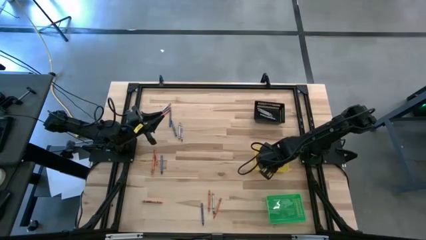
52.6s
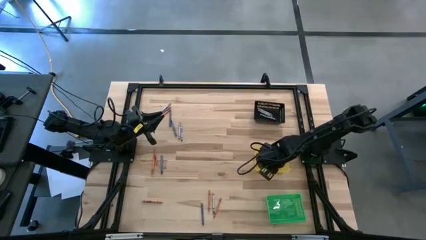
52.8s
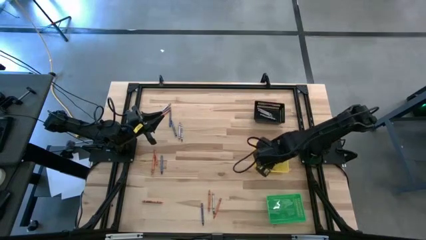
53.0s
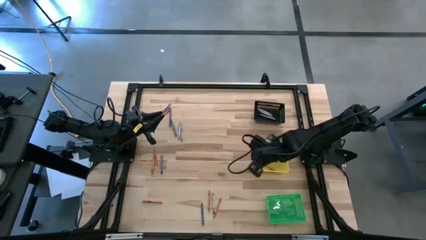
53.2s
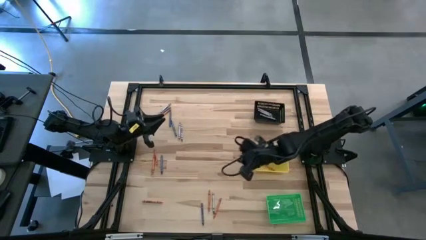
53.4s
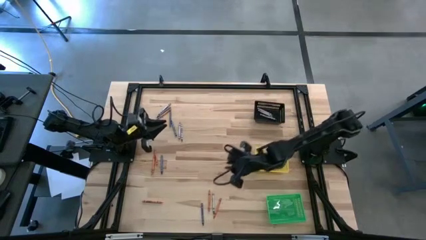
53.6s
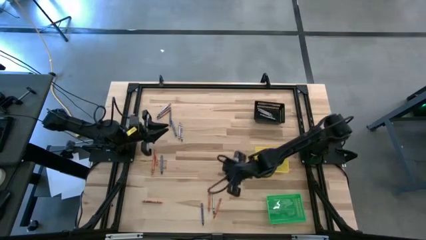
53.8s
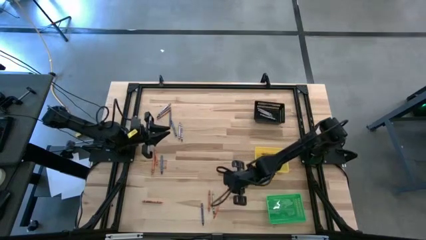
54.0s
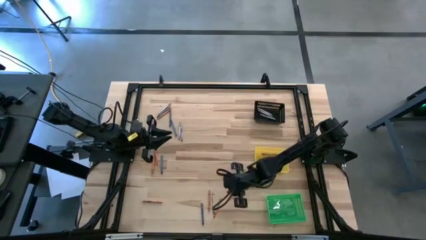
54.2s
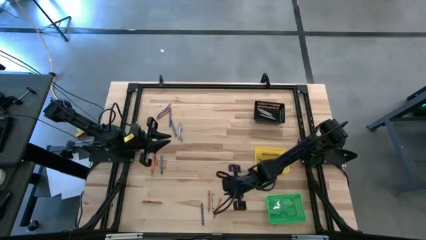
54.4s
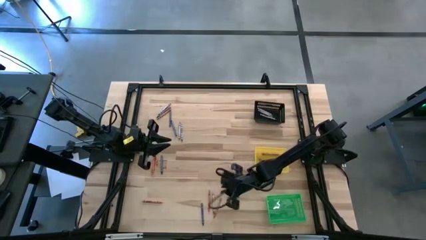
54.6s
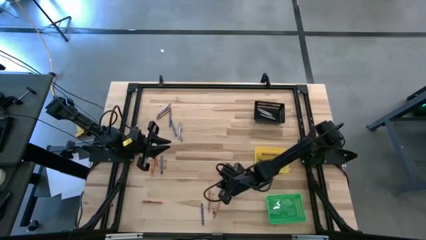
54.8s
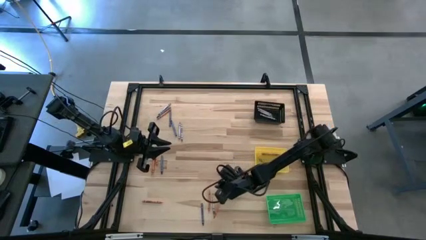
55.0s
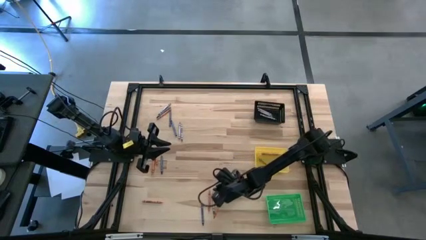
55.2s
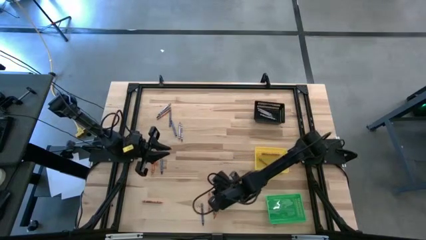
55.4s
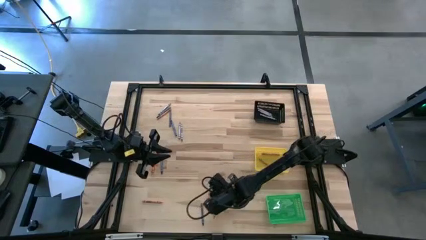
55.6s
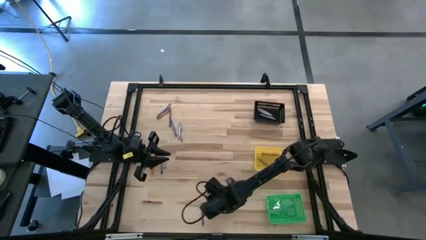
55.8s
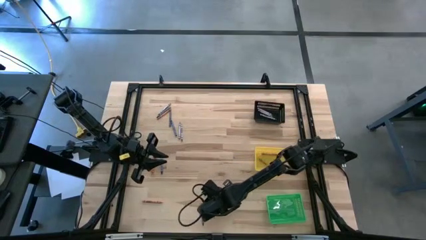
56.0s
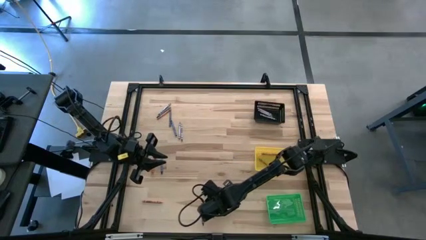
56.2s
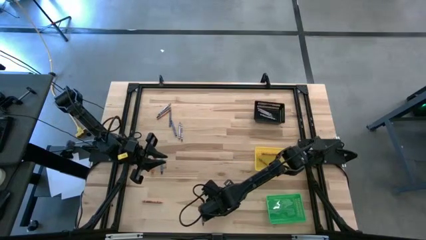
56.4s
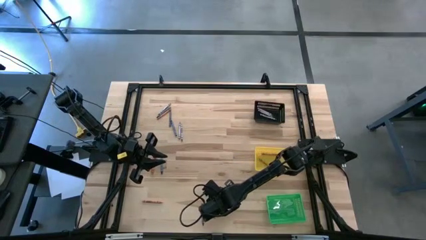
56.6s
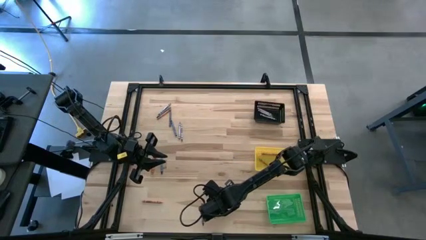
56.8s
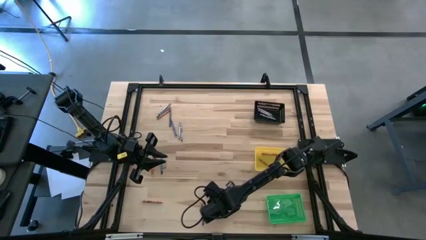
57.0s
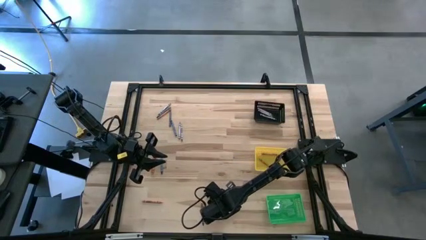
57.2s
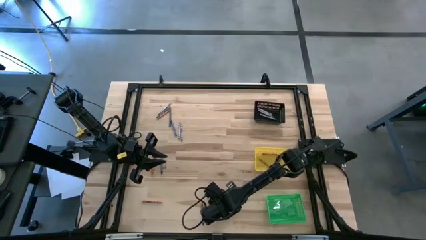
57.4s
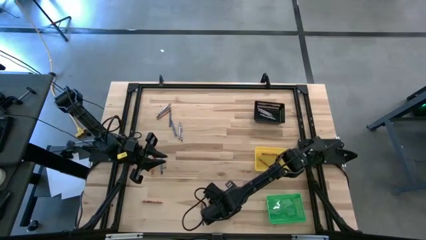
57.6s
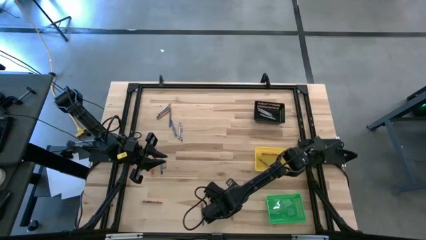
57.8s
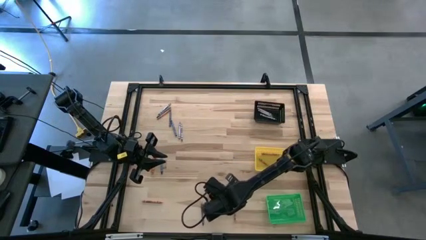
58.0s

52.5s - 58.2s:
Task: Sort crayons
Put the gray crayon into the black basket

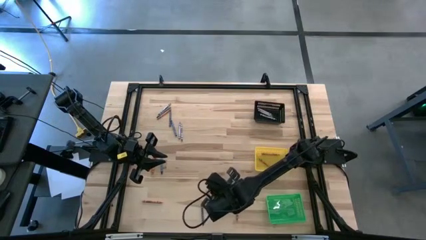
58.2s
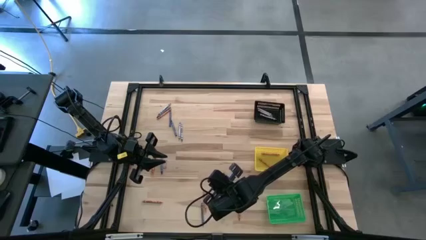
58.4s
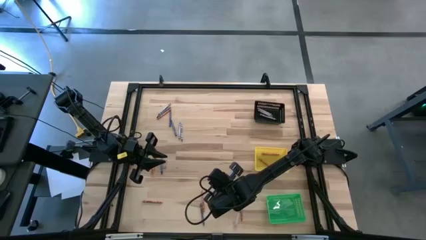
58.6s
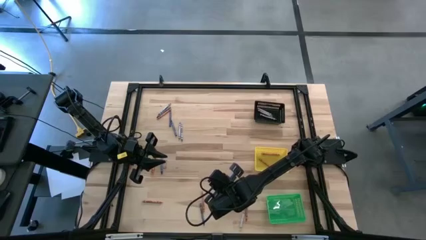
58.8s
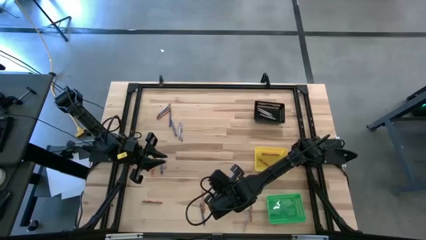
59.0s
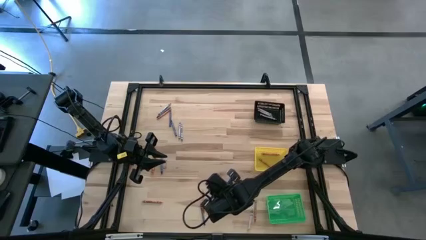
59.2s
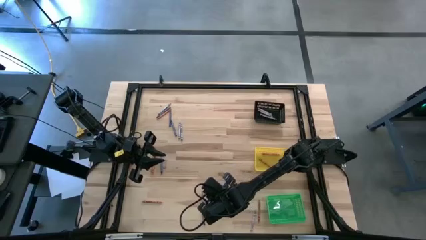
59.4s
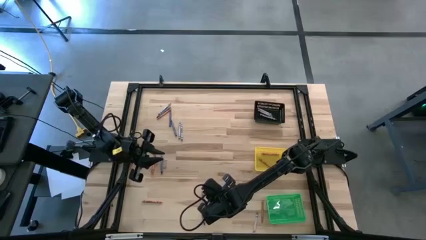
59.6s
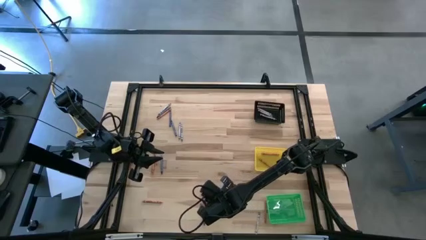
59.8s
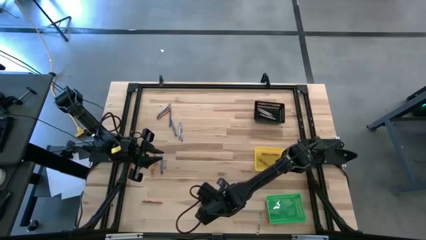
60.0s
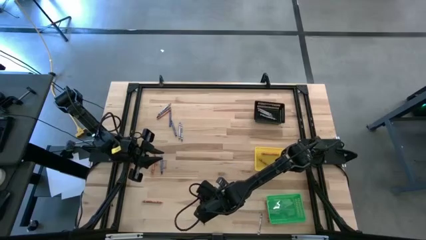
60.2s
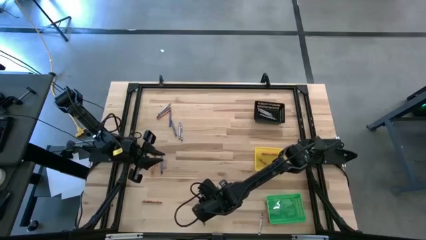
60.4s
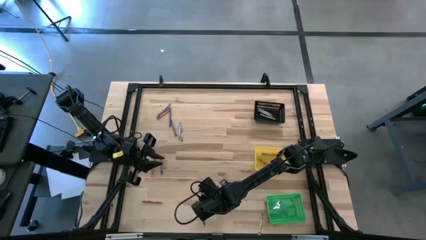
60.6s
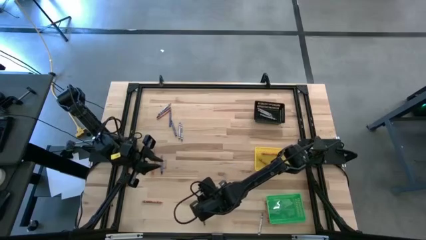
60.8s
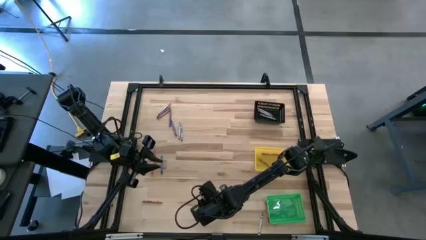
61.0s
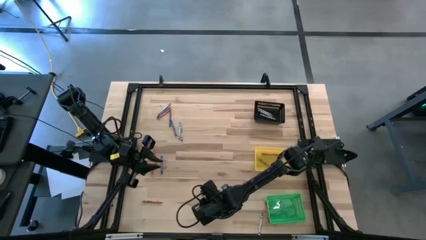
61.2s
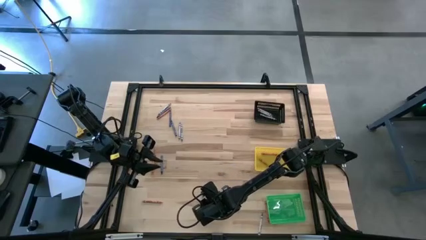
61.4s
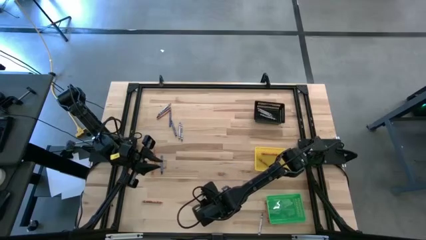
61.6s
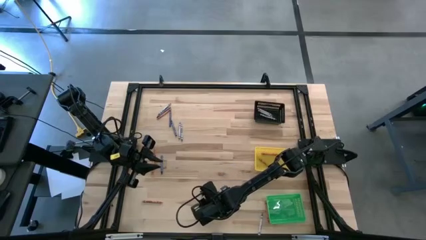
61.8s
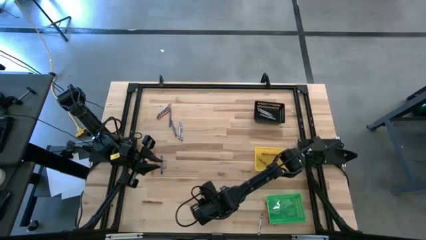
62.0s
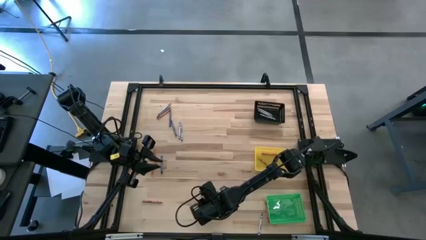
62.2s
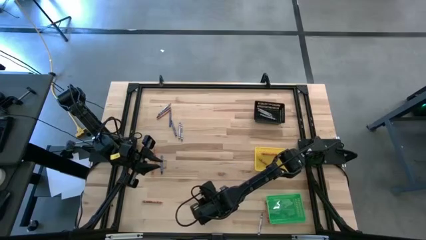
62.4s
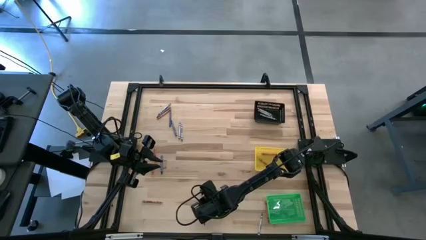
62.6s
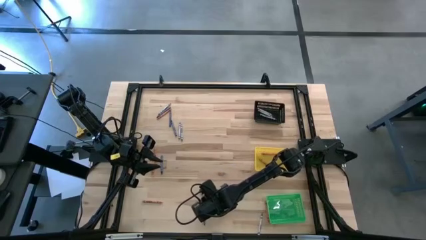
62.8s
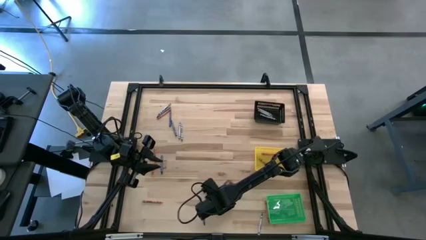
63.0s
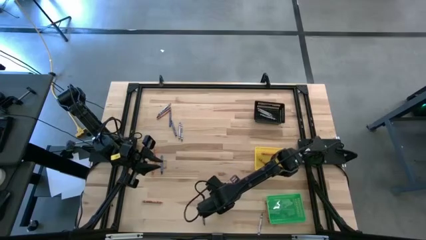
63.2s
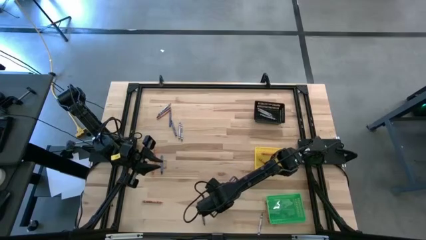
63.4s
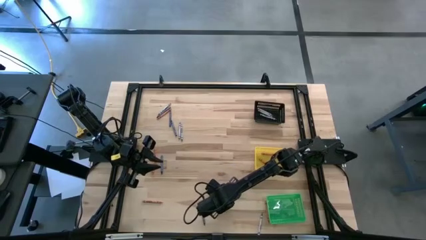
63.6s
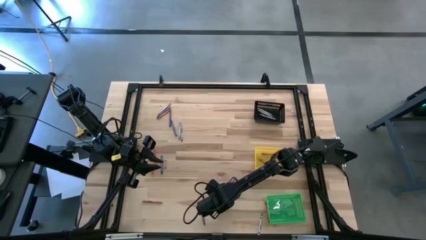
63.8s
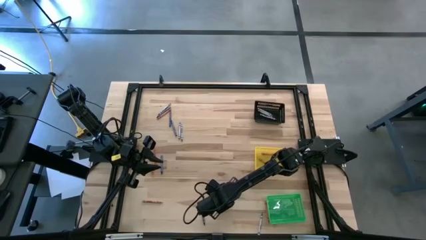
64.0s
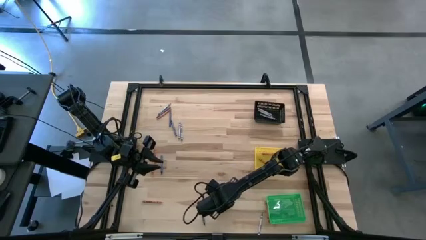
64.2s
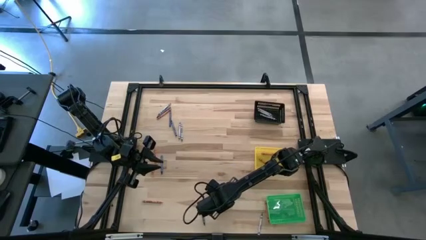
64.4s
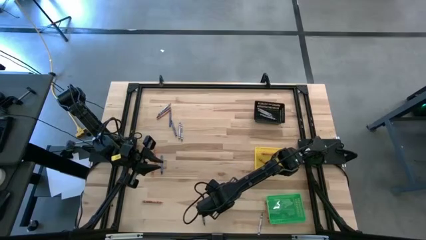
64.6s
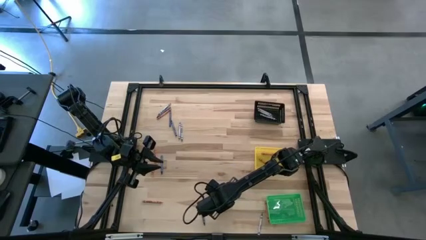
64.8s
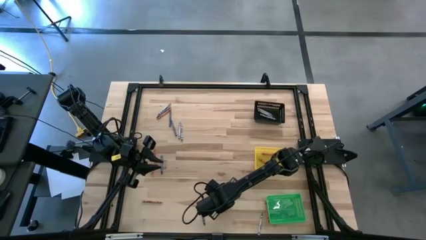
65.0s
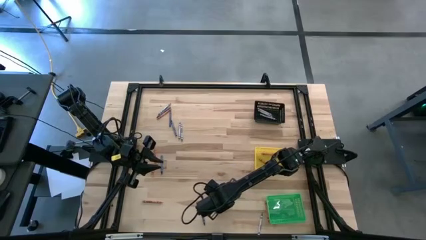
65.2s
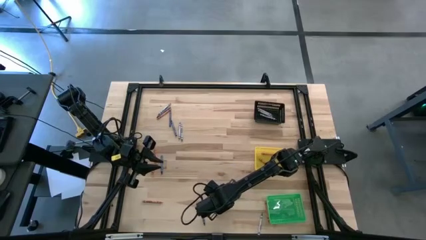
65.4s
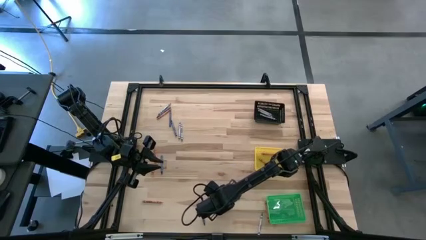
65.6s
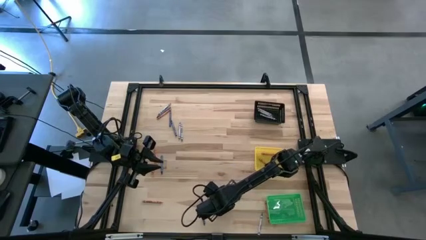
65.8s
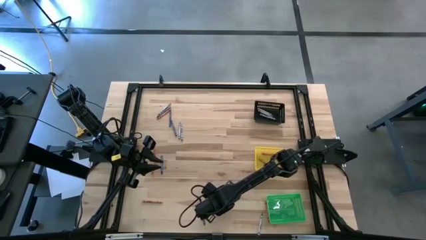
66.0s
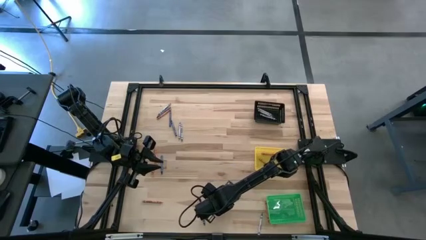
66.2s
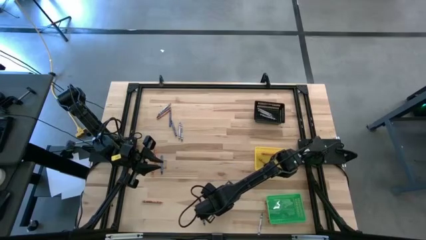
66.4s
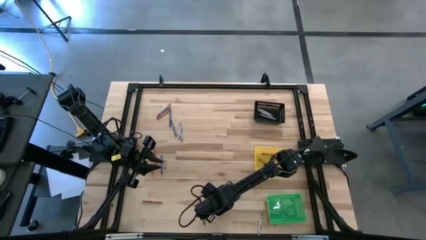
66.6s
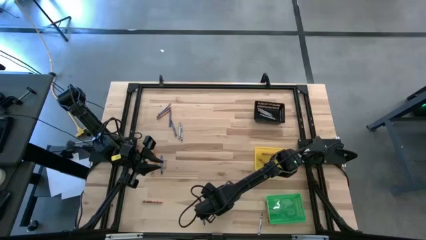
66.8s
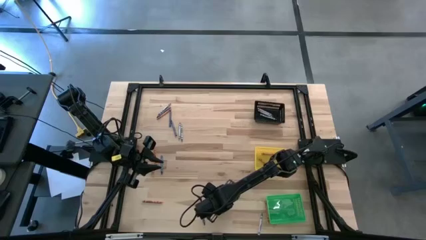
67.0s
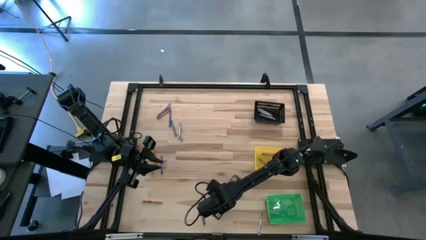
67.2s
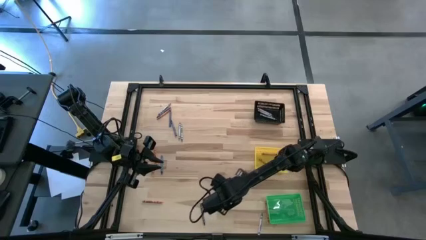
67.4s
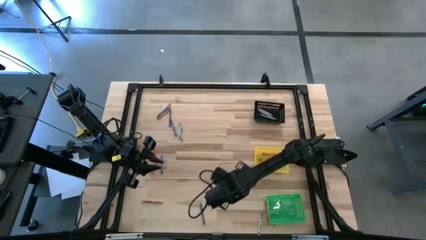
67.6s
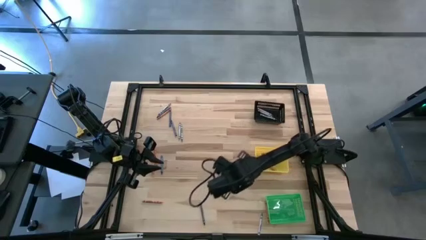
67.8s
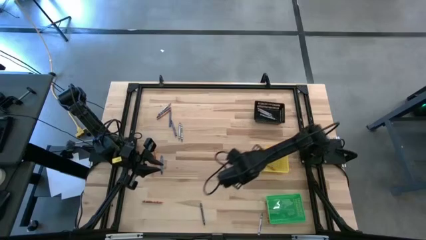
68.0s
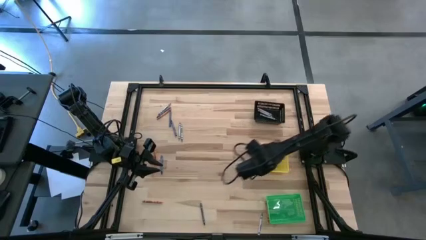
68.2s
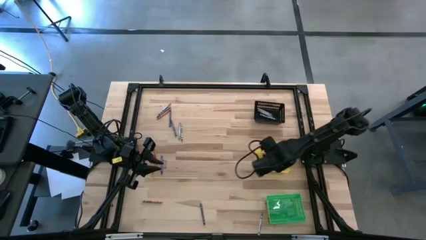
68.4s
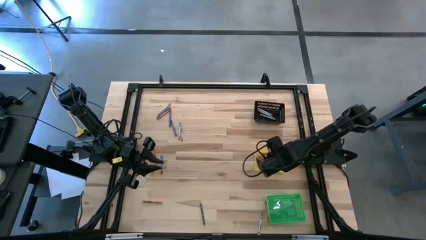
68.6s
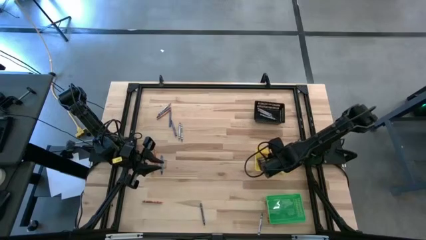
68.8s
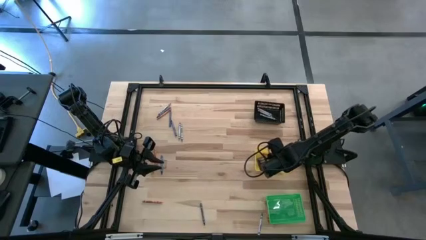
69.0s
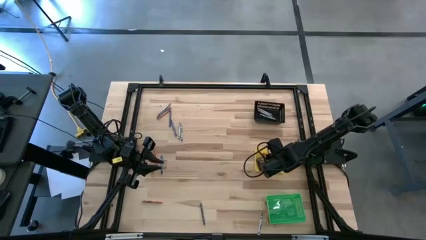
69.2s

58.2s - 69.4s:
Put the orange crayon into the yellow basket
